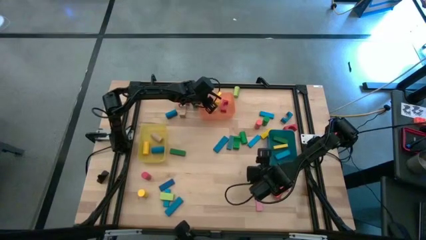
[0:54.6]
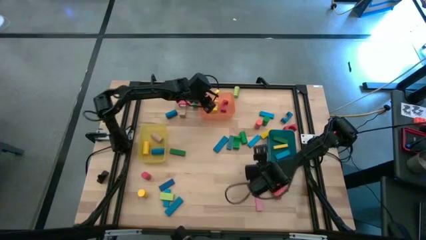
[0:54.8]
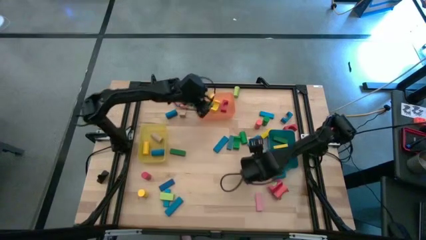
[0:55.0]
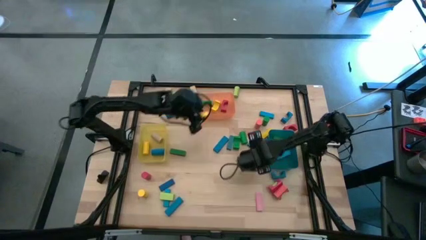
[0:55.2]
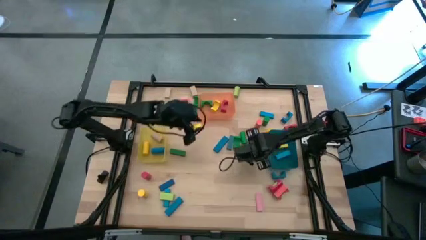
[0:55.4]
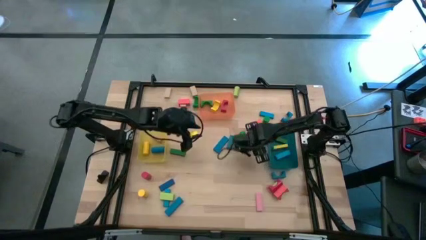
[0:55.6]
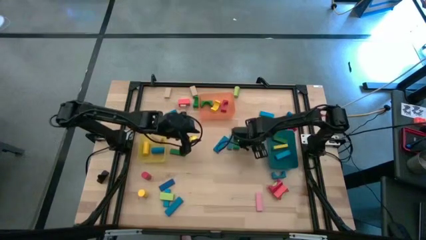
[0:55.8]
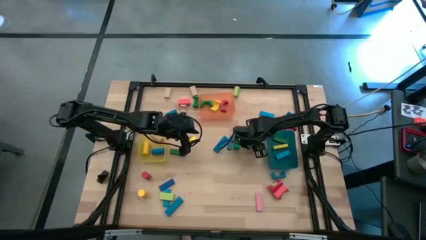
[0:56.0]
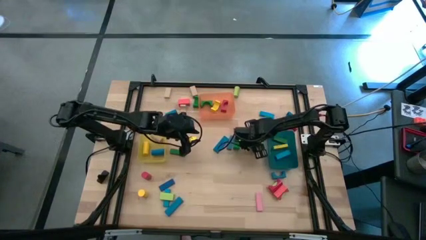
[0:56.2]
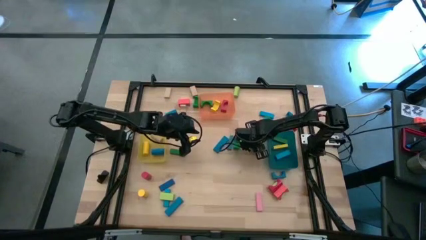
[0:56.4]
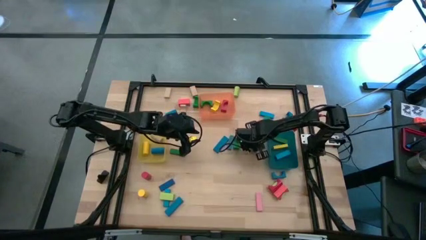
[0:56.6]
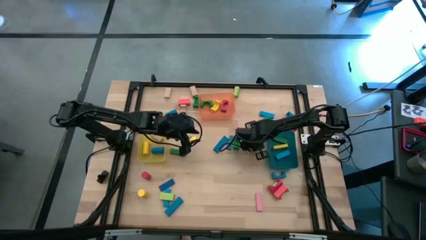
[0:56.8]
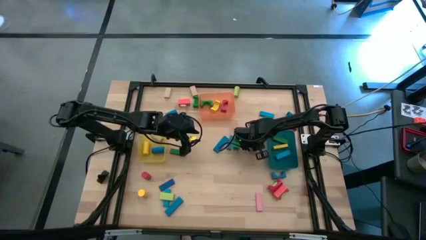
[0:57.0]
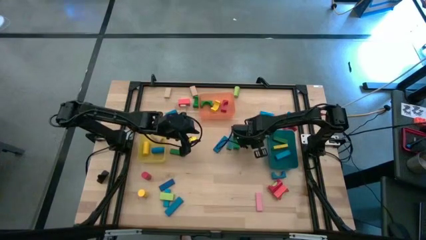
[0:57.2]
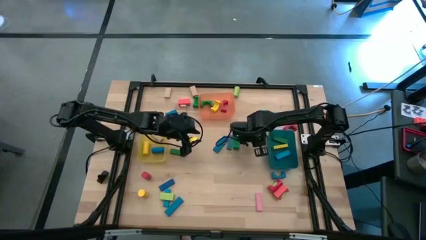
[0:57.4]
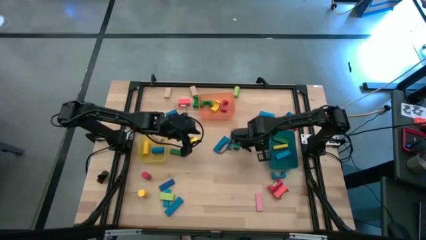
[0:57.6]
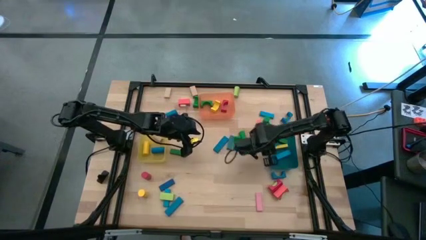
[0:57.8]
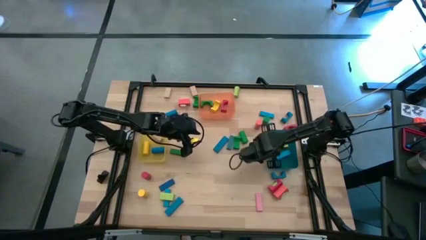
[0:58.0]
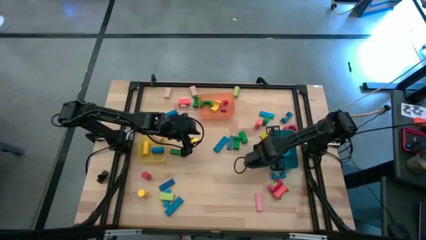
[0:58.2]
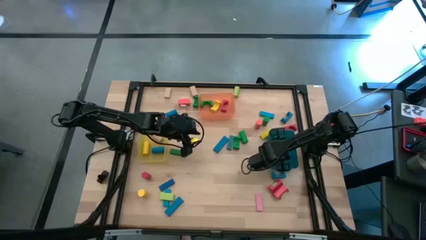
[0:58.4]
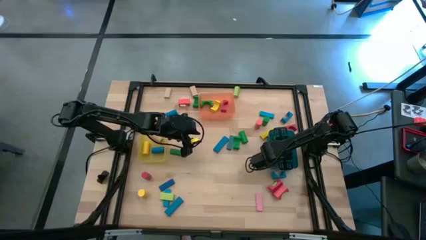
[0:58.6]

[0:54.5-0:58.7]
Task: Sort blocks by size
Put the blue rectangle block into the blue bin

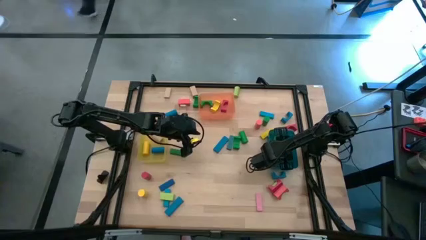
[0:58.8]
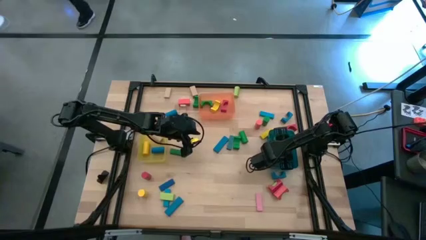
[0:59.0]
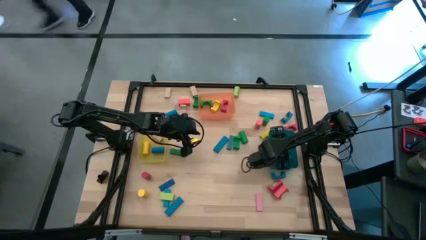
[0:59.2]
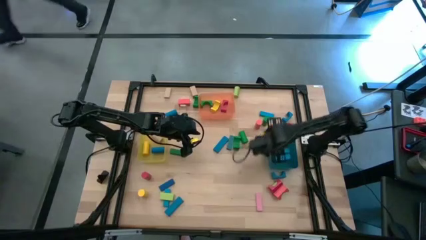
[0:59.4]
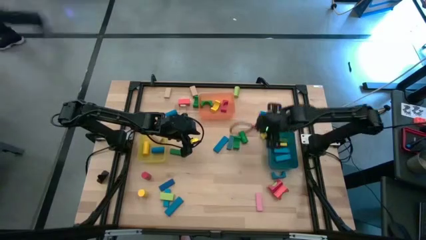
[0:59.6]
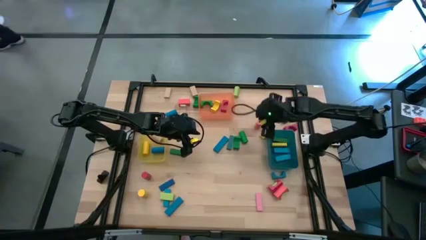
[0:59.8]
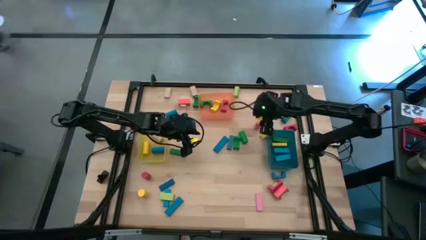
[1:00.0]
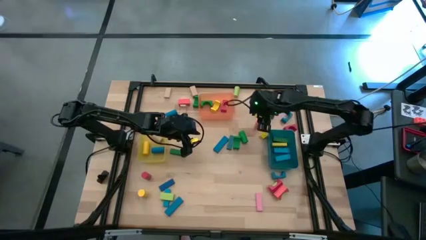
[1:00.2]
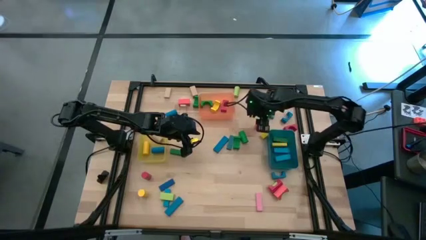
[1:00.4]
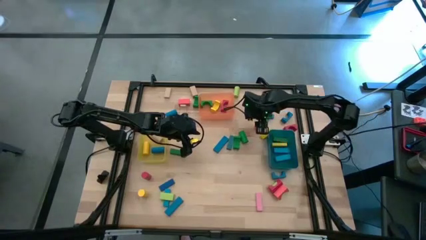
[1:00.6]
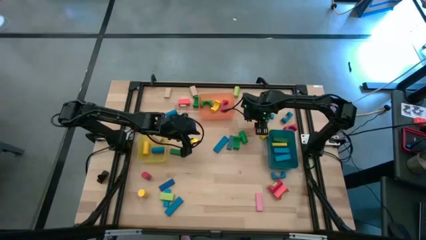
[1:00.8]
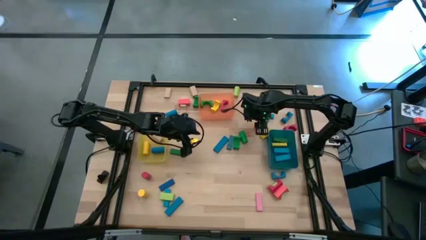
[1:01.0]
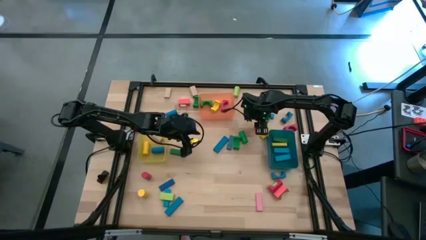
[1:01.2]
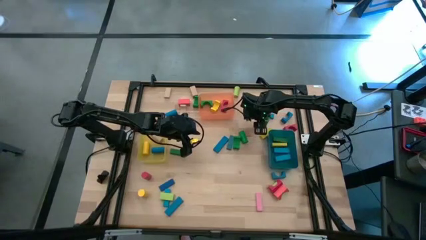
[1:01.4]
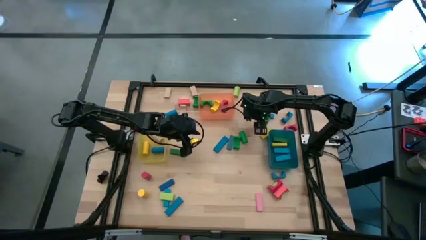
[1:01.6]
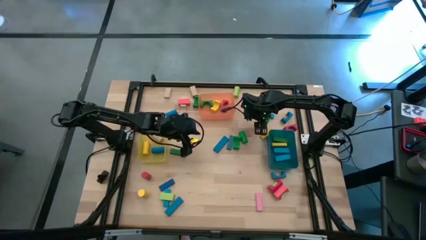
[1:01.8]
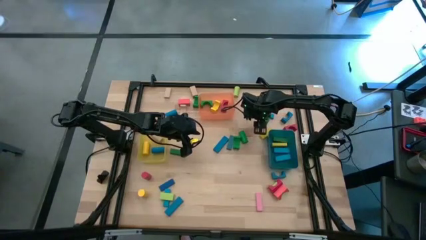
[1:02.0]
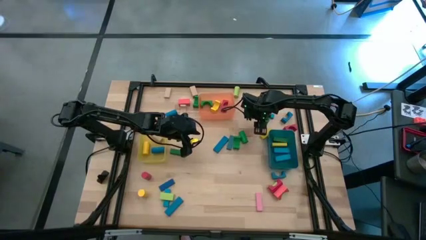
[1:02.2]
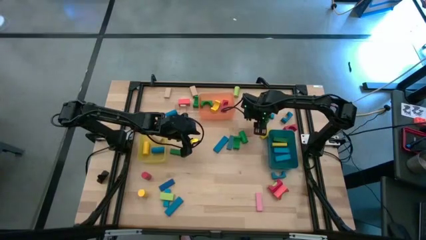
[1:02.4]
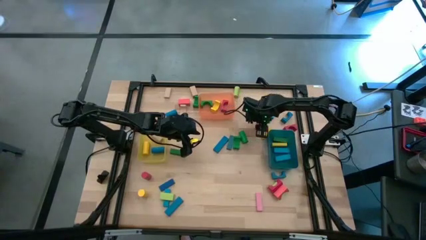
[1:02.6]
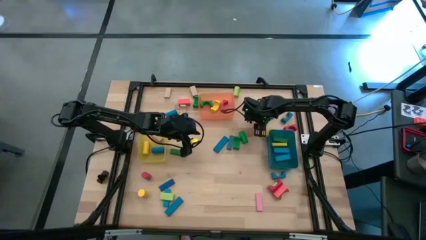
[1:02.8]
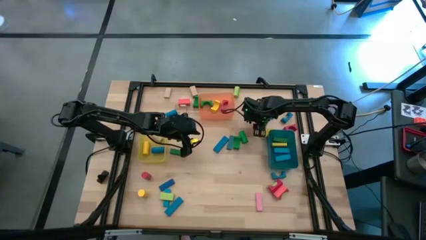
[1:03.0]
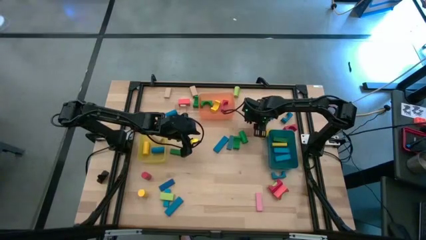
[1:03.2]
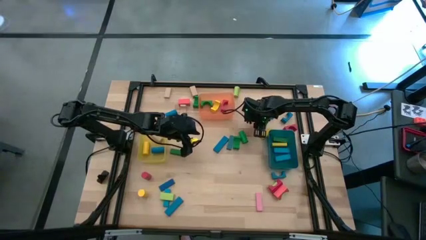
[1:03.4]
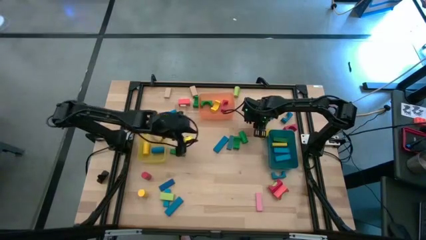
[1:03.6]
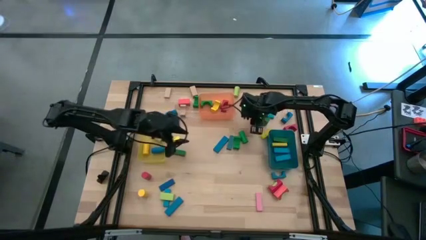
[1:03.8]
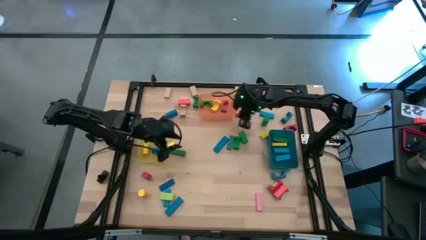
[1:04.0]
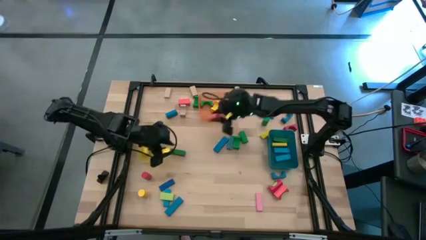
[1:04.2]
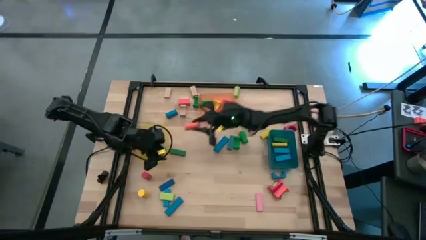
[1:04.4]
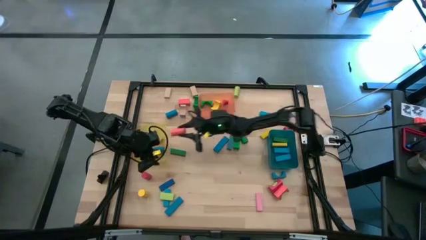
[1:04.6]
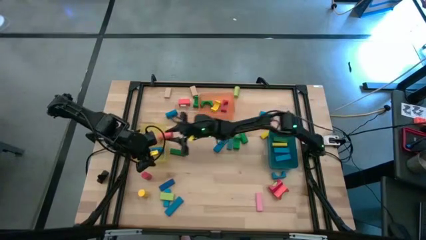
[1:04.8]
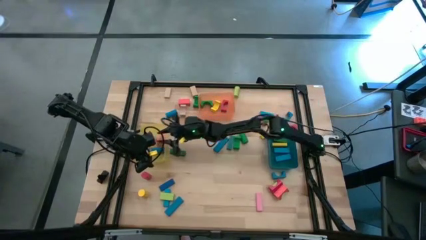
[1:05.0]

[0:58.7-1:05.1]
Put the orange cylindrical block into the yellow bin

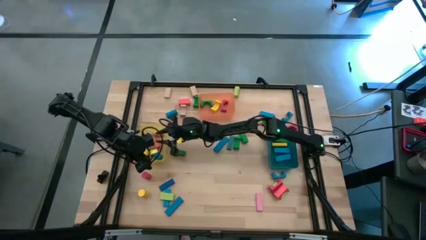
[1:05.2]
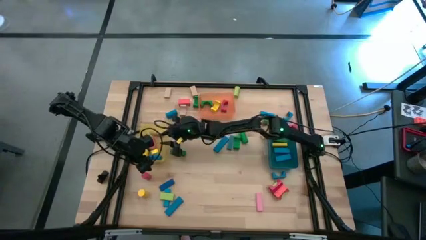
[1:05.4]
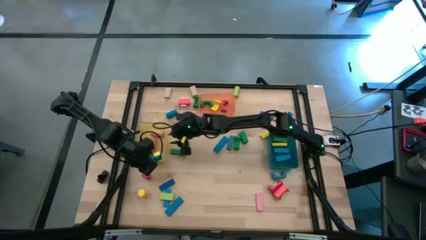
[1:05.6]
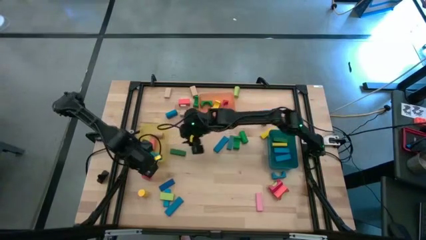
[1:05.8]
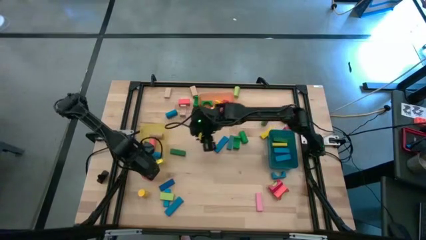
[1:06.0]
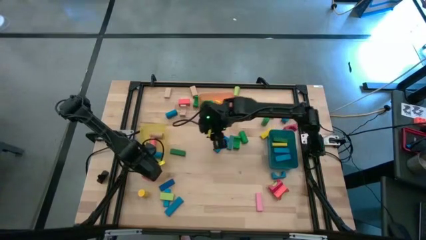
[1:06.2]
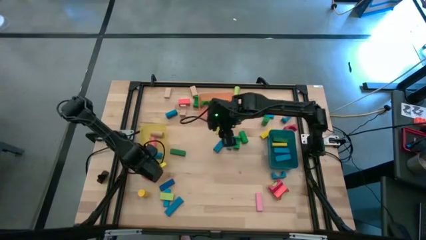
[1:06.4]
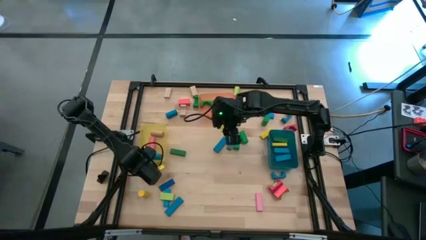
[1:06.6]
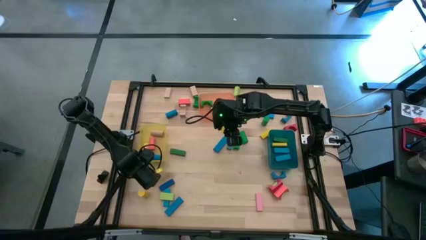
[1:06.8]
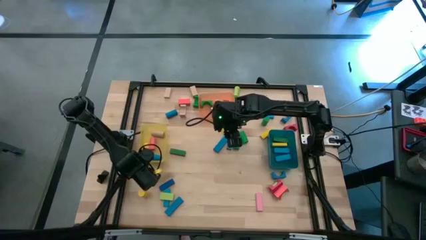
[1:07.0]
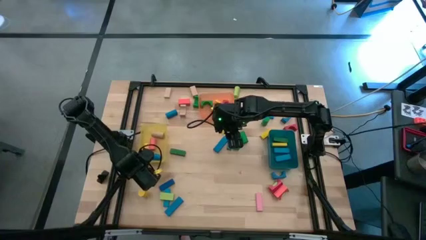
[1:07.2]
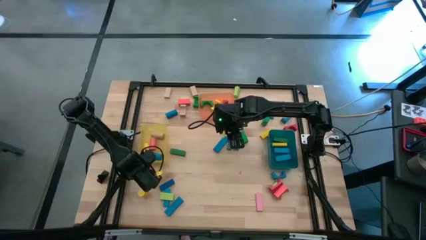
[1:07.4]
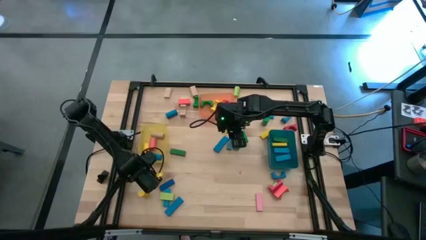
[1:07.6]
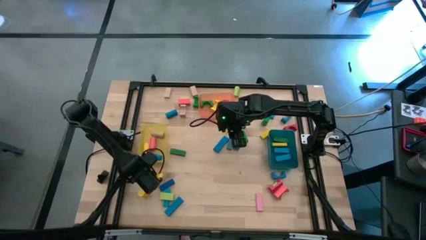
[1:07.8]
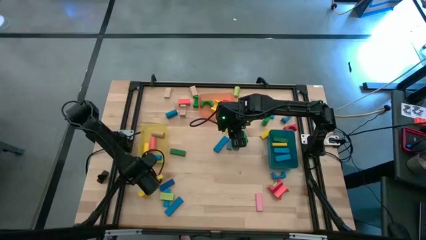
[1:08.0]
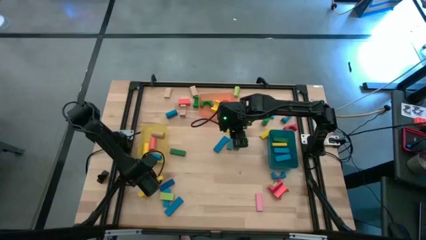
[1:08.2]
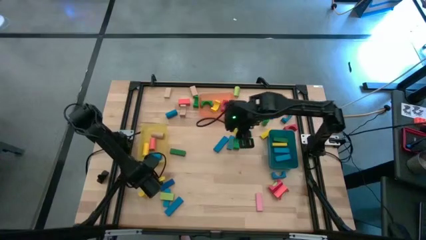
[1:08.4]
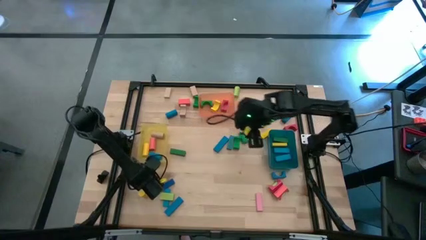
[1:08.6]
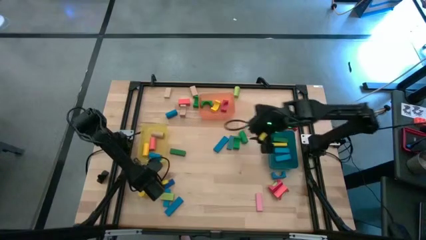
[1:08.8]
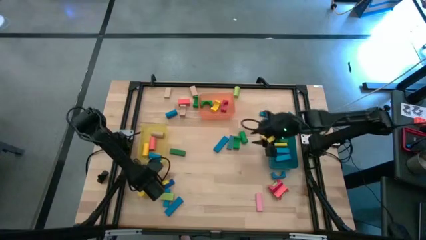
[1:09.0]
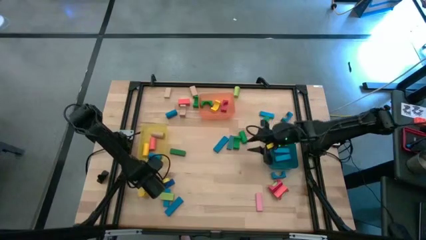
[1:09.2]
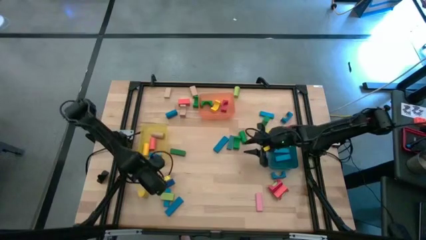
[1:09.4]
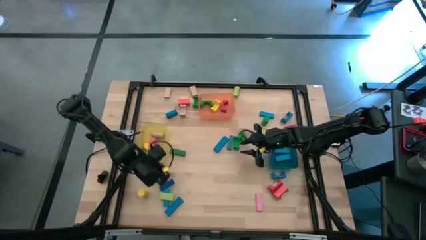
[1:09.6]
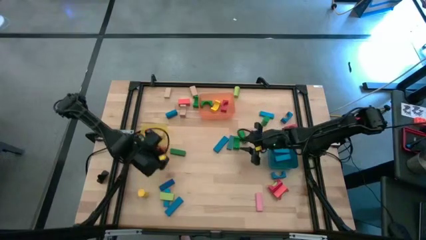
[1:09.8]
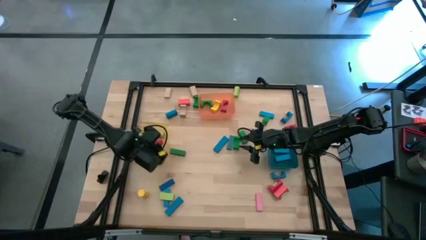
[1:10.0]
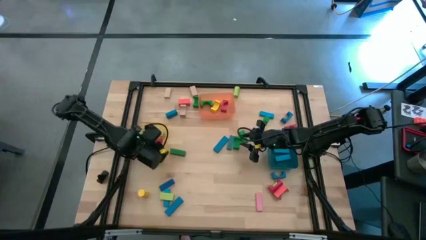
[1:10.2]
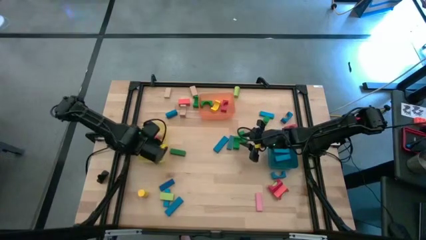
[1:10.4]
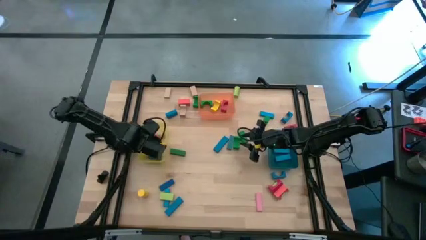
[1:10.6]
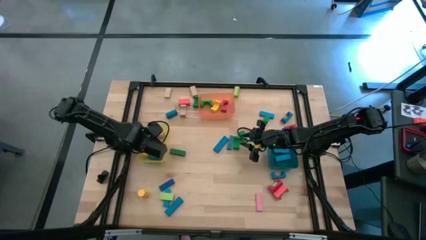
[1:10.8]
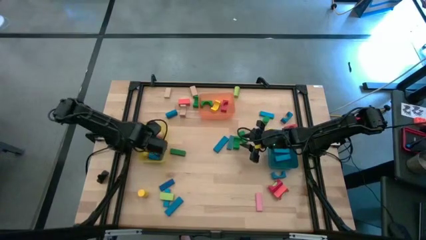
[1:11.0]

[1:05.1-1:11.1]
Put the red cylindrical block into the yellow bin

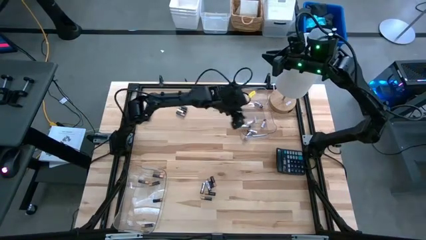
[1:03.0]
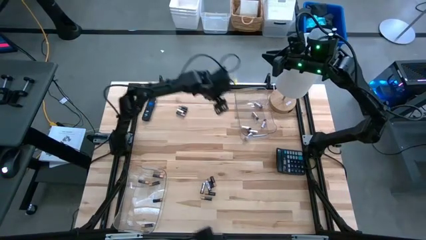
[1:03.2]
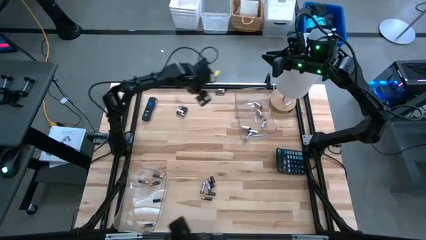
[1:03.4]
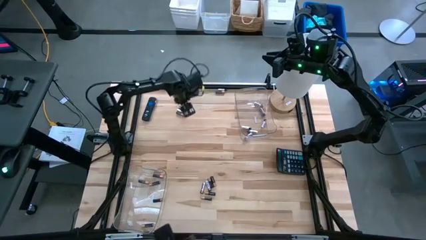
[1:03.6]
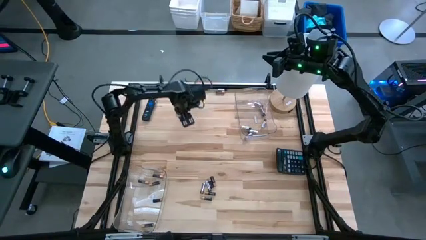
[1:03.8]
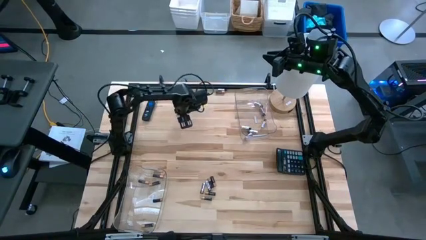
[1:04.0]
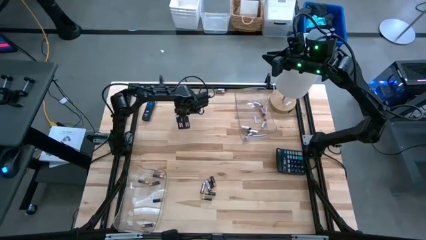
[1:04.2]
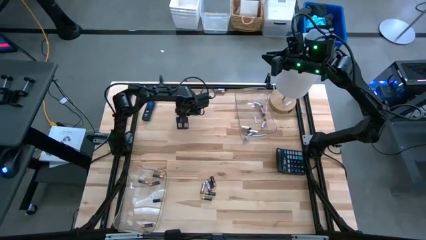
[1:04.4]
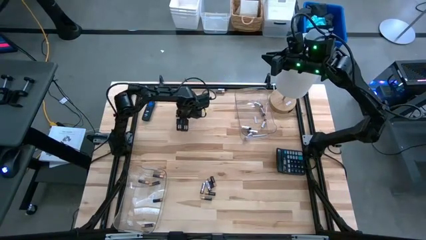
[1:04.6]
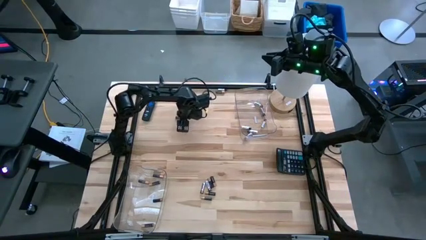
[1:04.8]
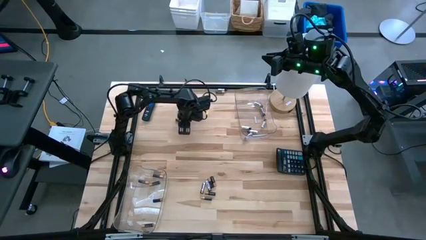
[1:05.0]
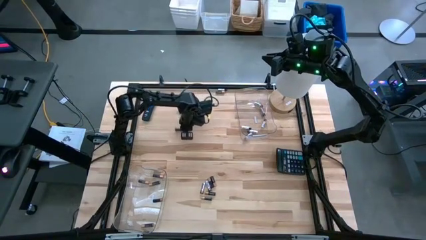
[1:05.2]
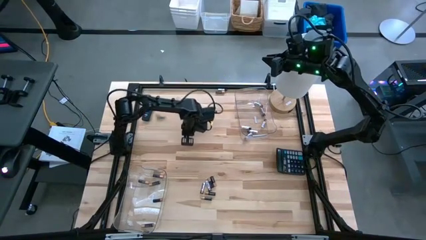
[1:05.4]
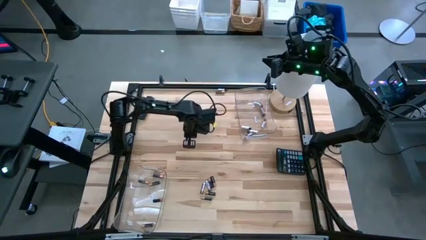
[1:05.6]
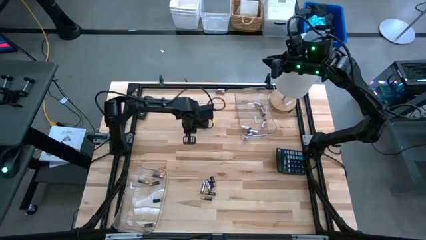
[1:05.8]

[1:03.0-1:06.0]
Task: Sort batteries
Put the brown battery into the left transparent bin
